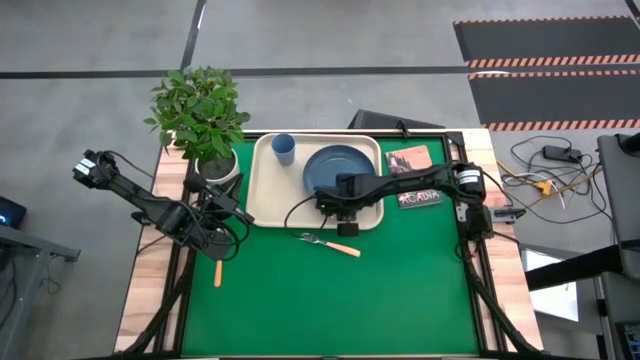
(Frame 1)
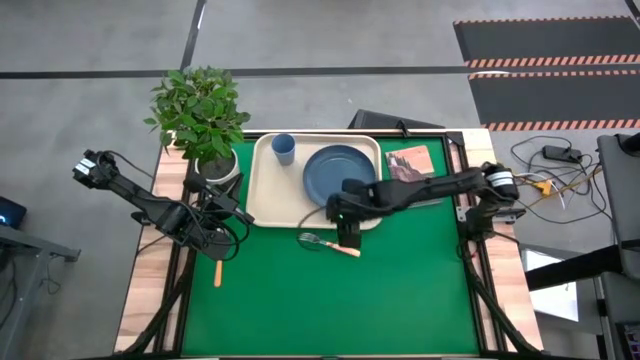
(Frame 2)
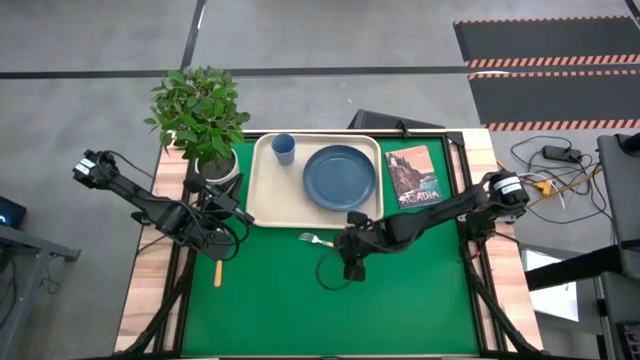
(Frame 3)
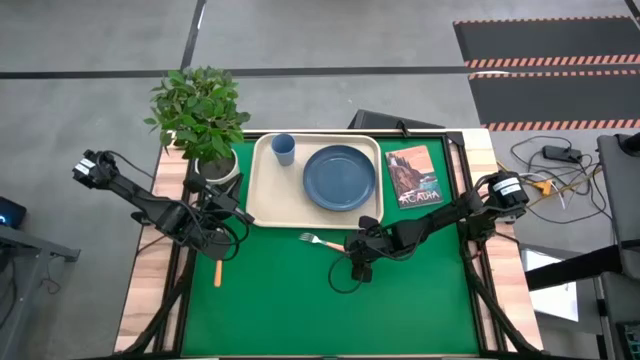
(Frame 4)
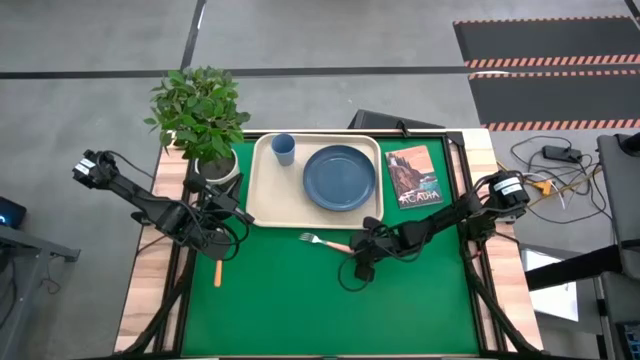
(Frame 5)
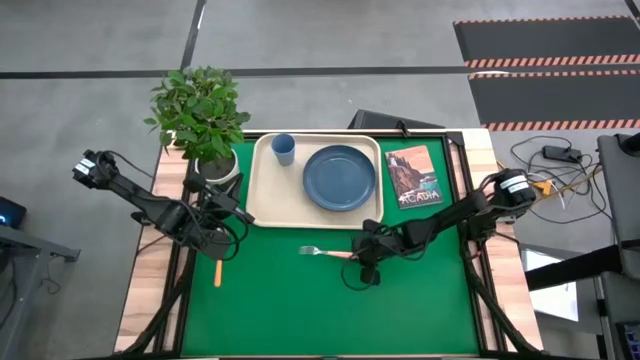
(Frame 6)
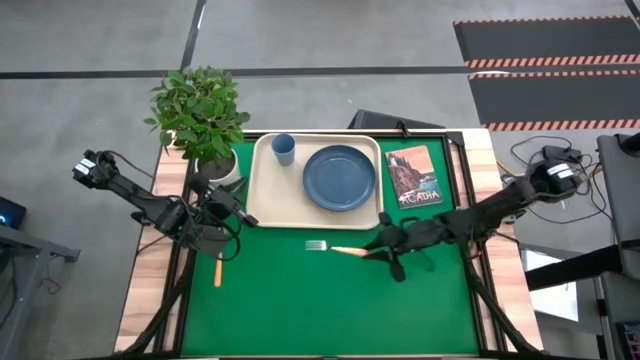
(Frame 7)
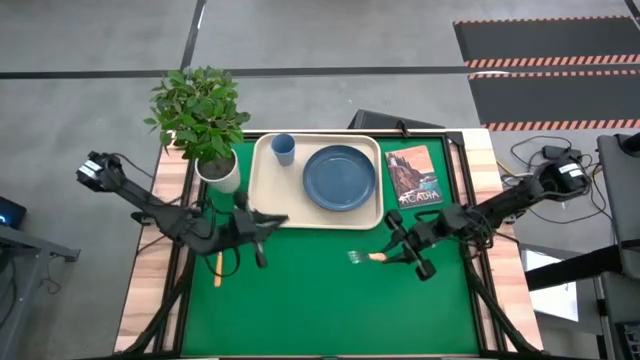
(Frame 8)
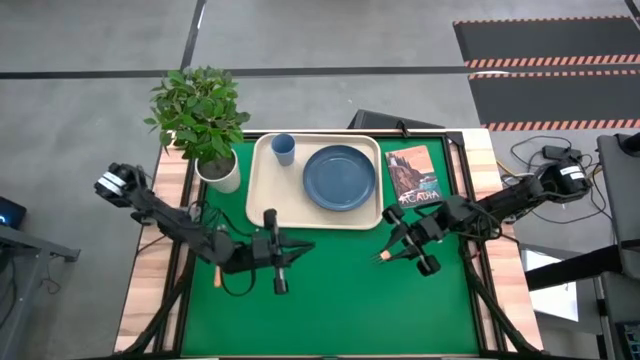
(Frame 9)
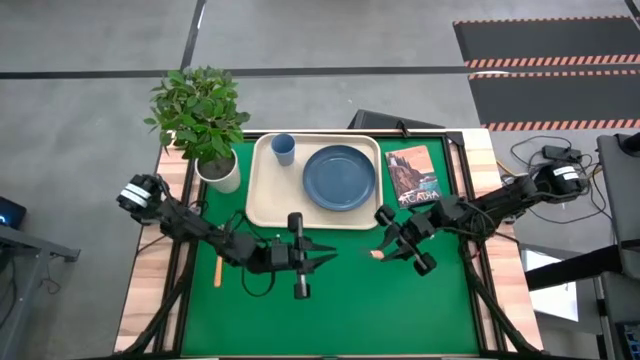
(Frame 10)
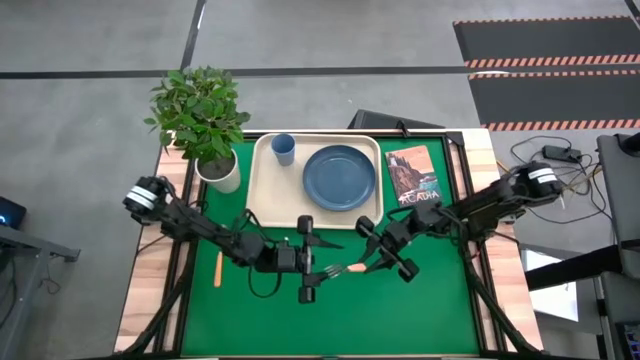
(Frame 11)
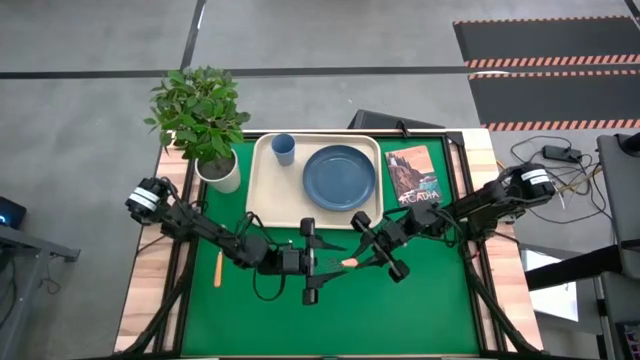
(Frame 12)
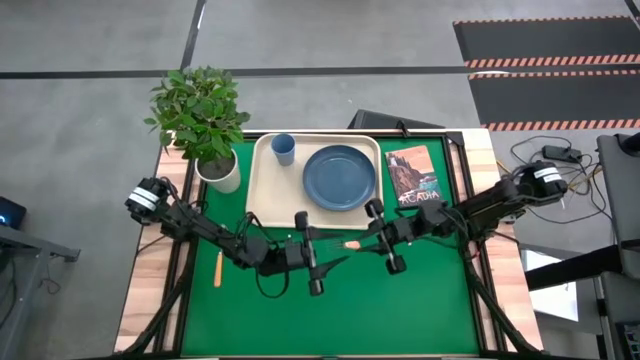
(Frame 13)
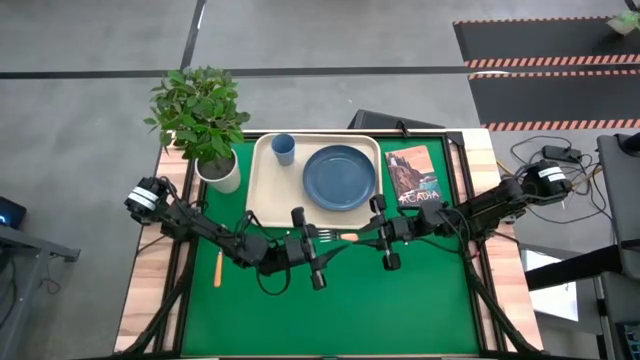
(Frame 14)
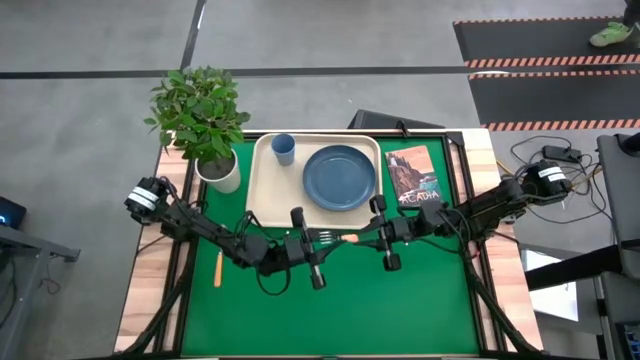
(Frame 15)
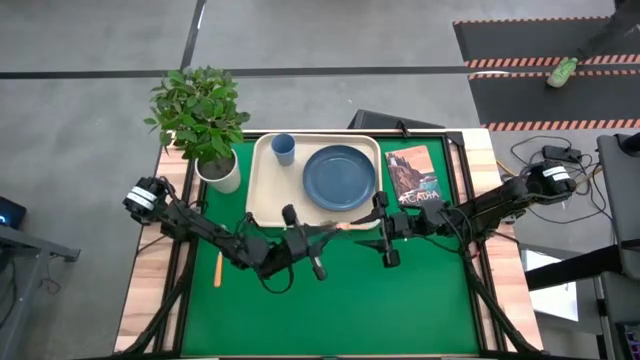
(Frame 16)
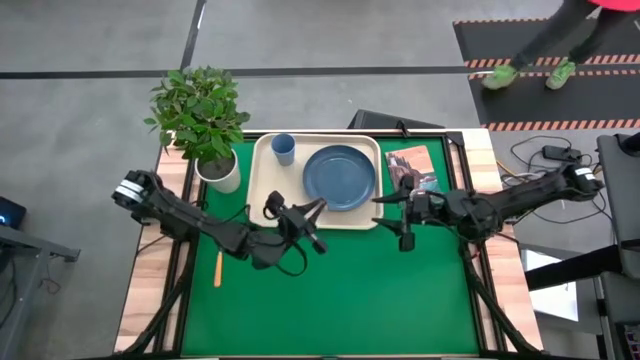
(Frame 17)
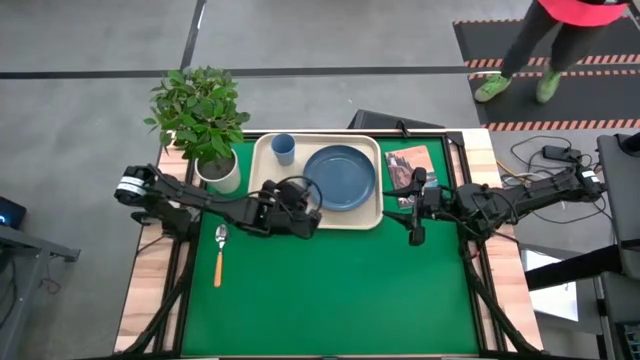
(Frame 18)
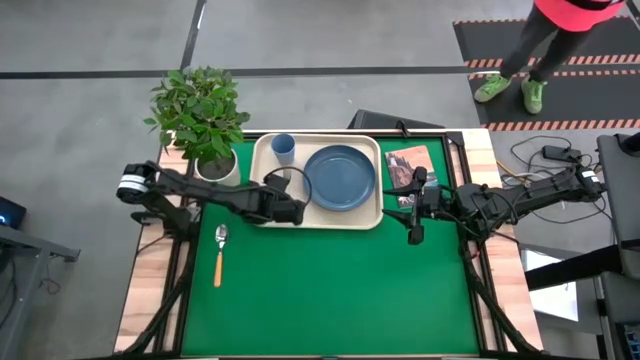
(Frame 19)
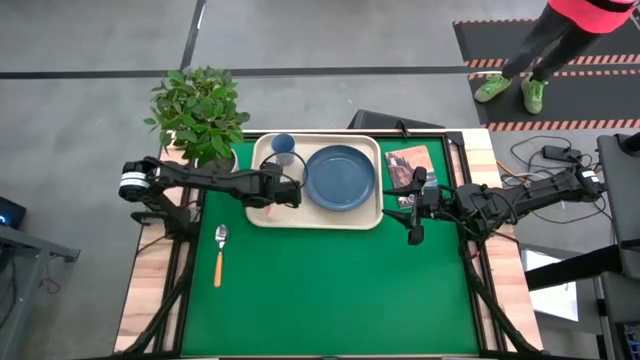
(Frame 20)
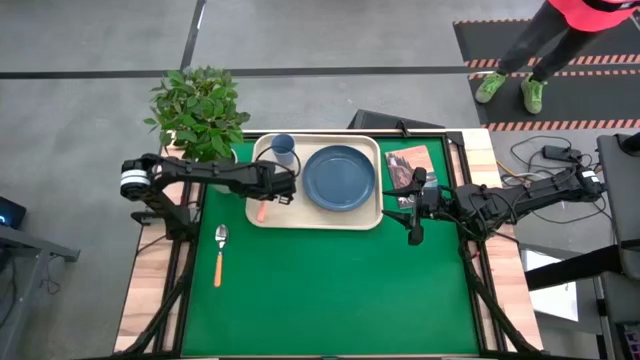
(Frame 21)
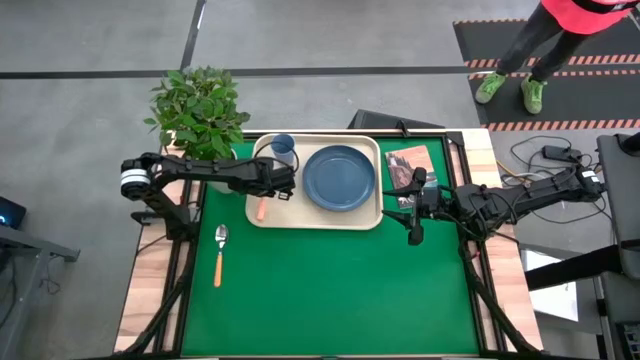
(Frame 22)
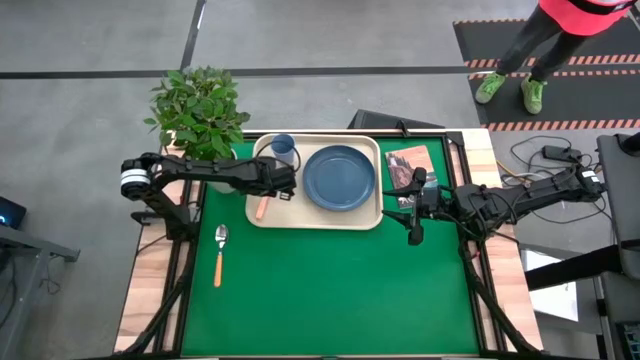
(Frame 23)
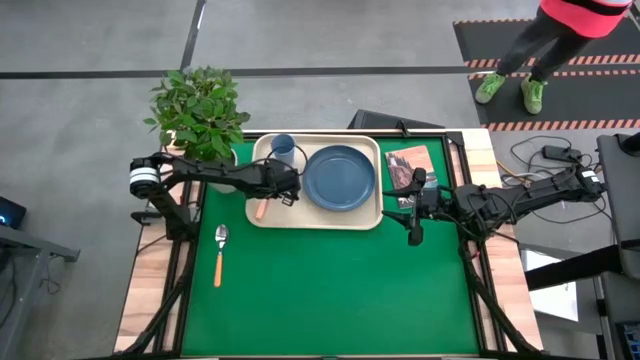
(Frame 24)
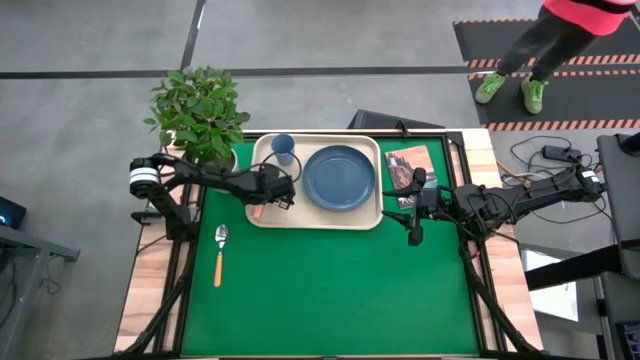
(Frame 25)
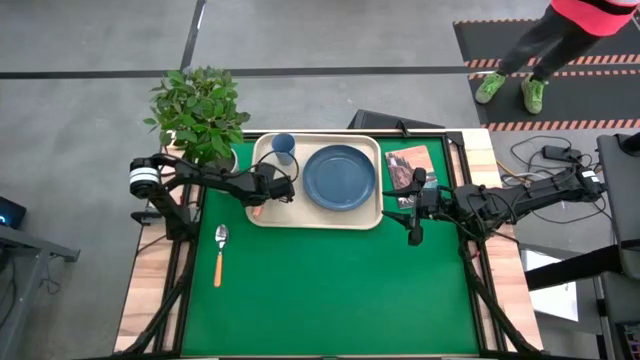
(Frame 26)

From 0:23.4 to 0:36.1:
Task: Pick and place plate/cup/fork/spoon on tray
Put the orange fork on the white food tray

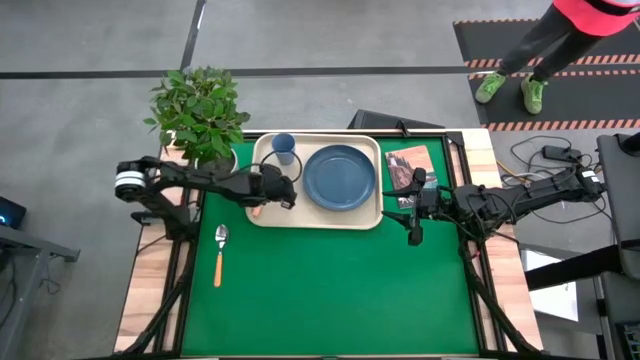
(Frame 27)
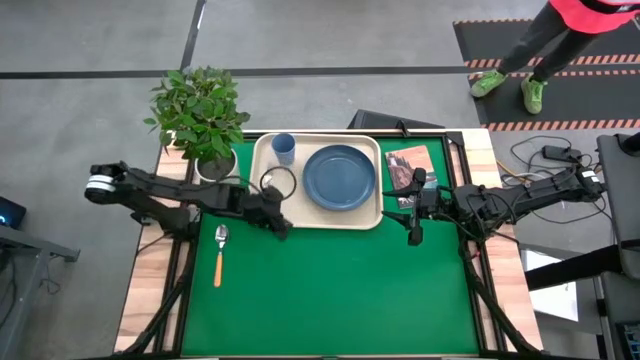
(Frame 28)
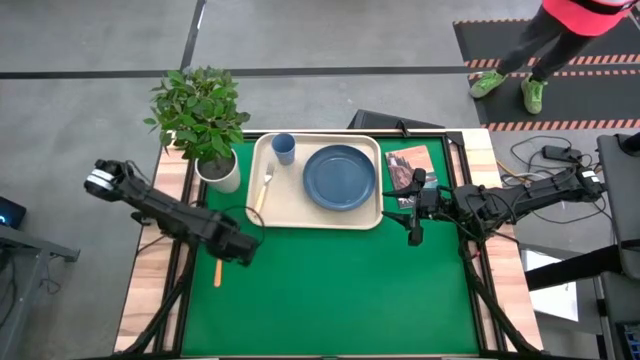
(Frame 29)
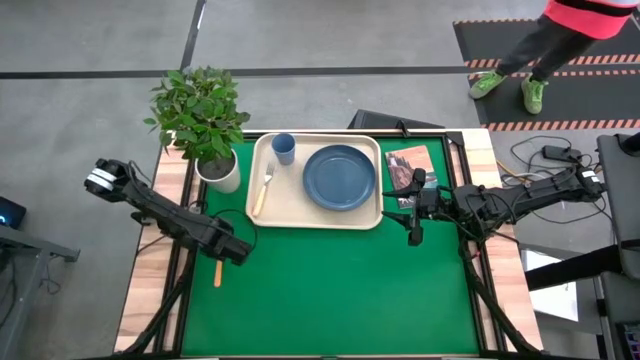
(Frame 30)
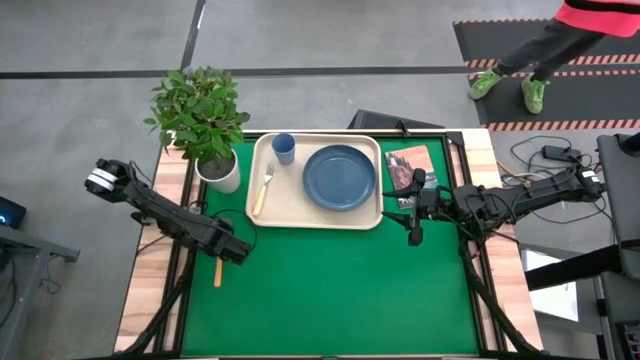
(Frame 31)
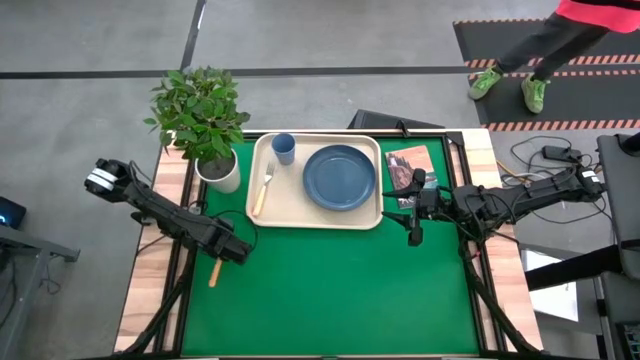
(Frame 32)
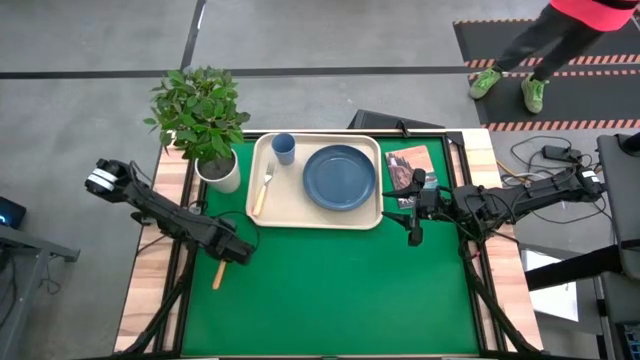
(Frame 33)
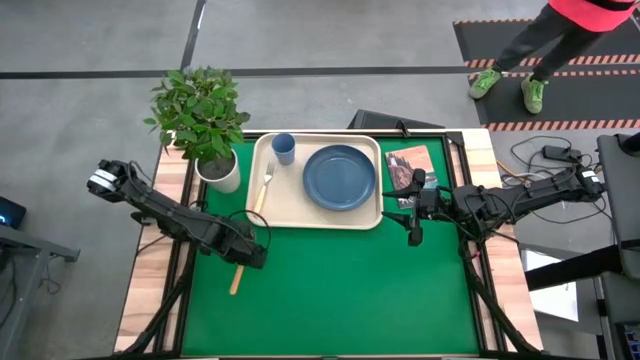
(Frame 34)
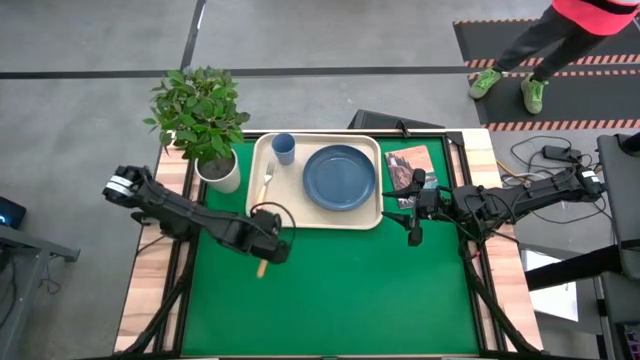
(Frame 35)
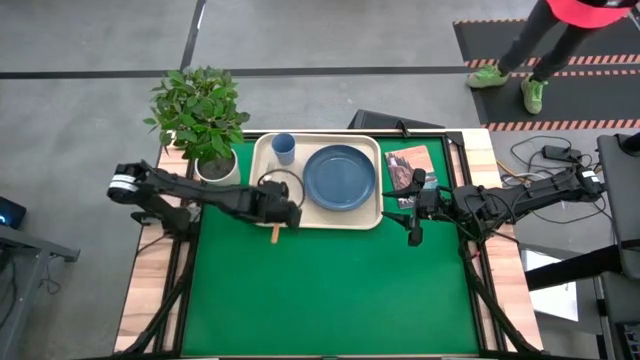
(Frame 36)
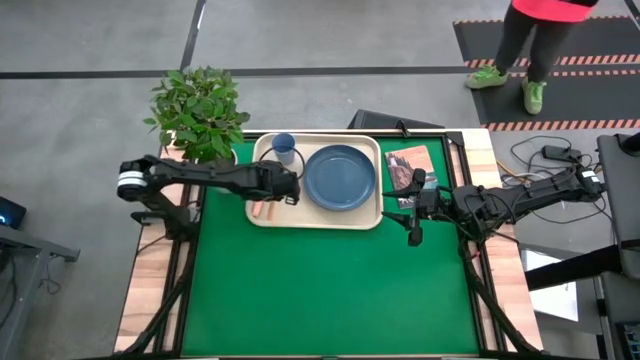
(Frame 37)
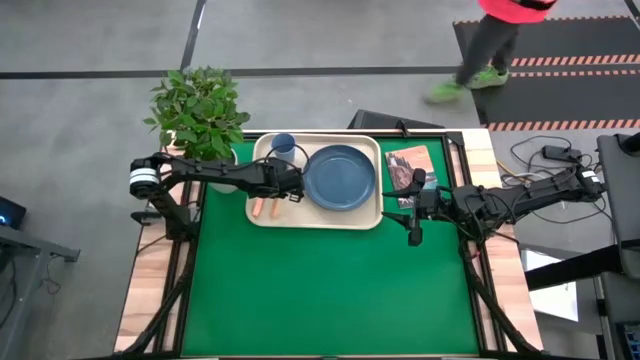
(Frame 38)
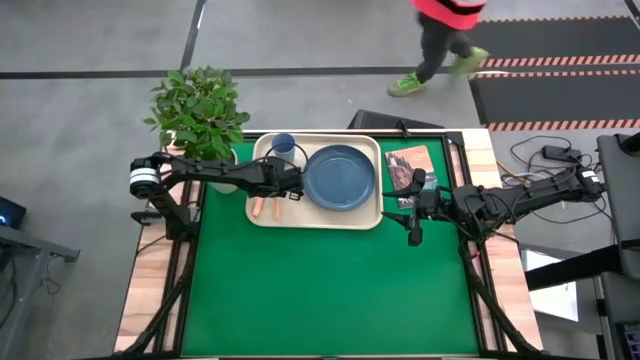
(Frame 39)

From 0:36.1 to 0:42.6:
Put the orange spoon on the white food tray beside the orange fork
